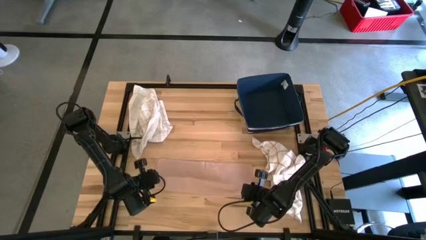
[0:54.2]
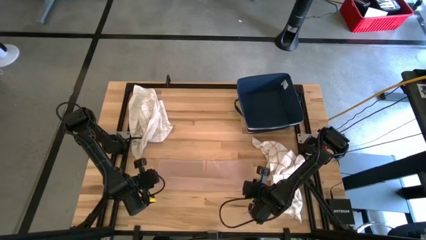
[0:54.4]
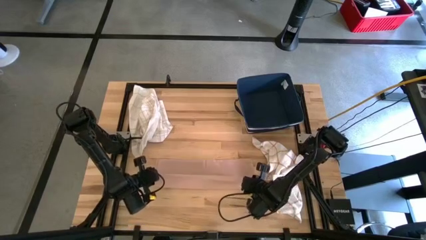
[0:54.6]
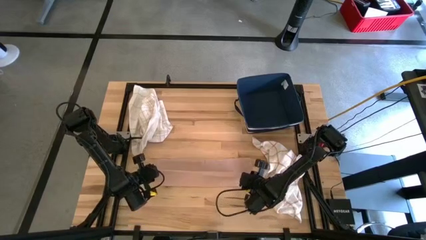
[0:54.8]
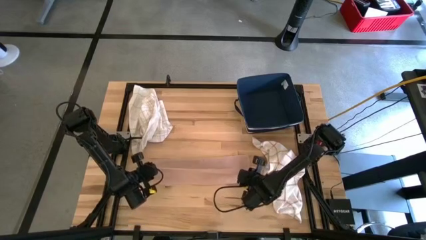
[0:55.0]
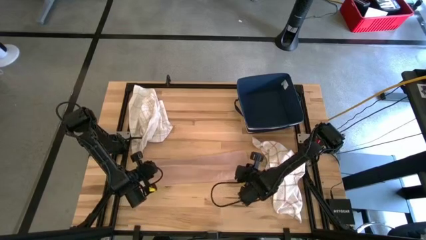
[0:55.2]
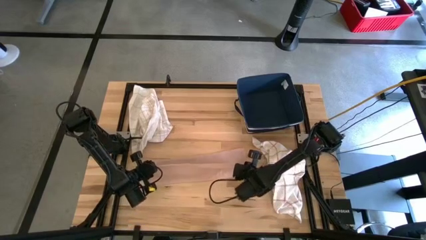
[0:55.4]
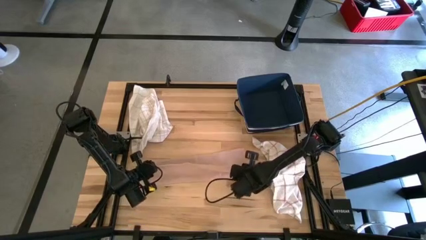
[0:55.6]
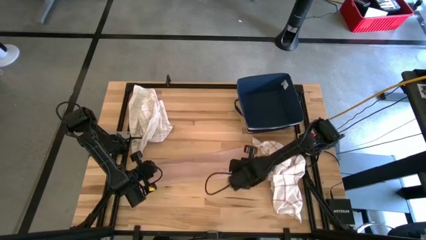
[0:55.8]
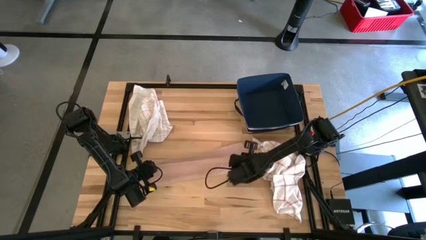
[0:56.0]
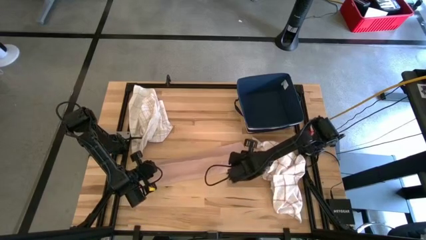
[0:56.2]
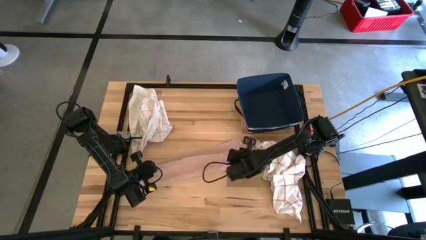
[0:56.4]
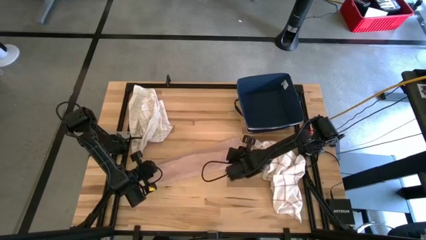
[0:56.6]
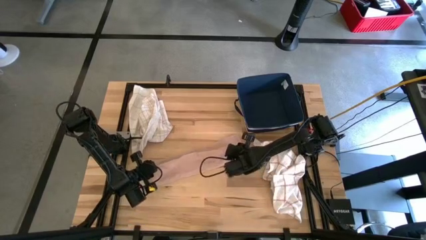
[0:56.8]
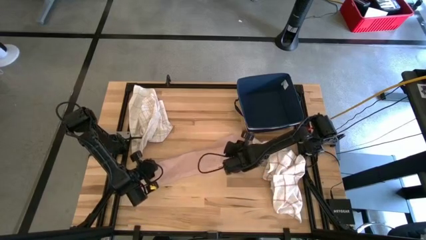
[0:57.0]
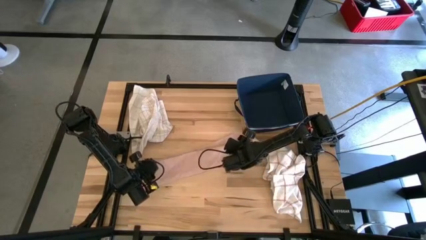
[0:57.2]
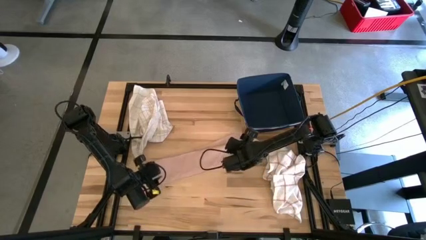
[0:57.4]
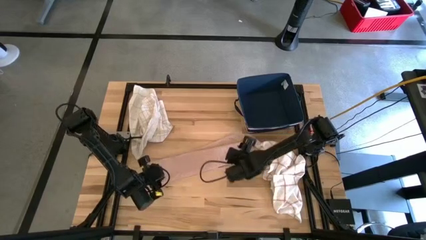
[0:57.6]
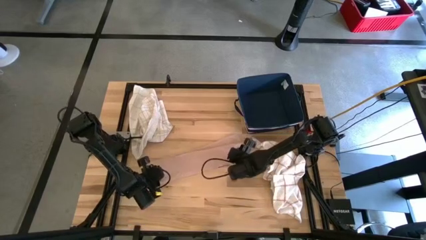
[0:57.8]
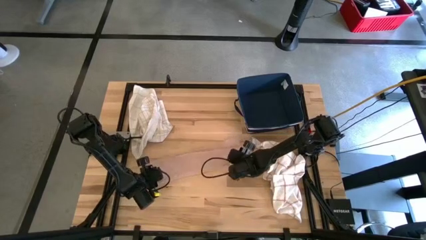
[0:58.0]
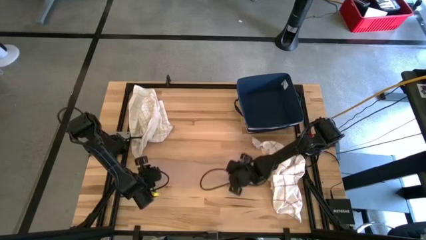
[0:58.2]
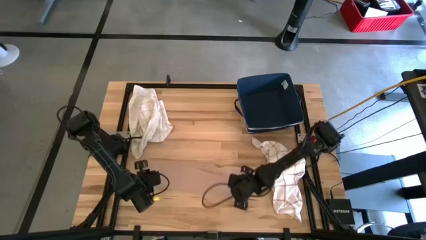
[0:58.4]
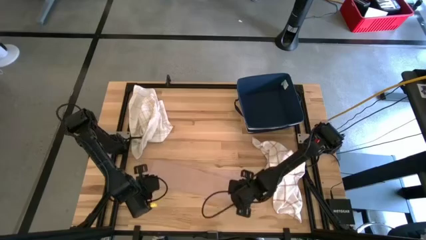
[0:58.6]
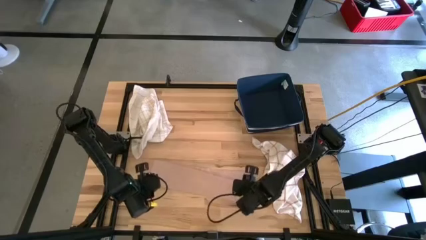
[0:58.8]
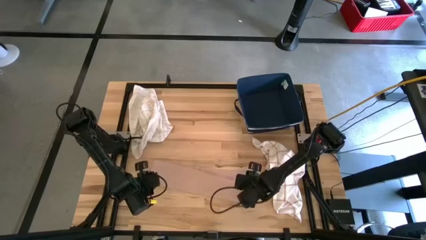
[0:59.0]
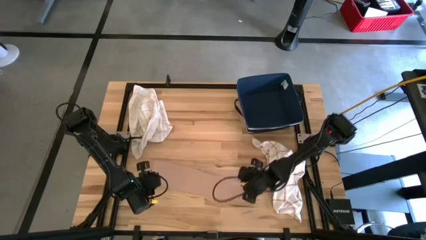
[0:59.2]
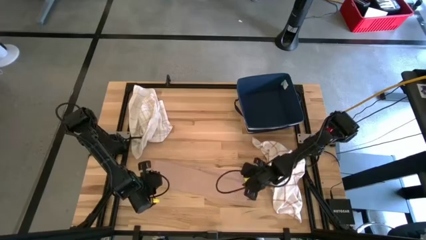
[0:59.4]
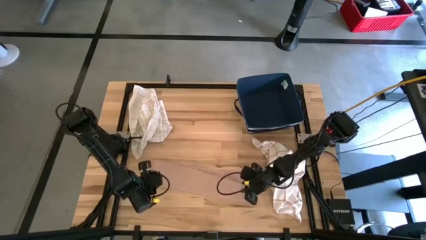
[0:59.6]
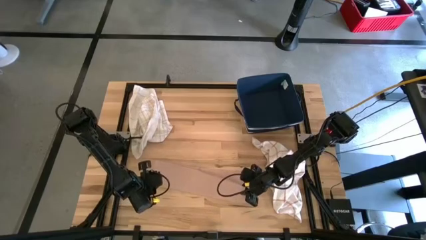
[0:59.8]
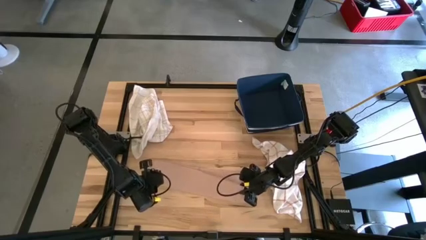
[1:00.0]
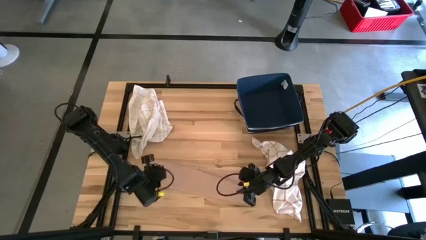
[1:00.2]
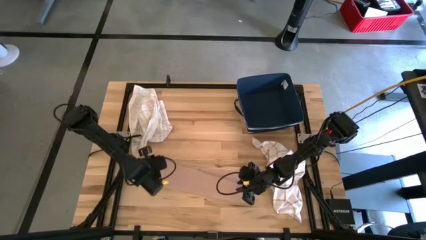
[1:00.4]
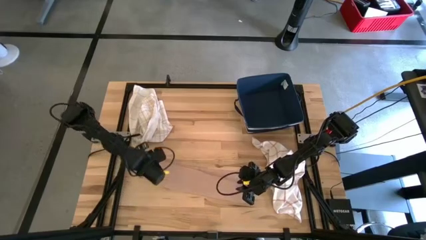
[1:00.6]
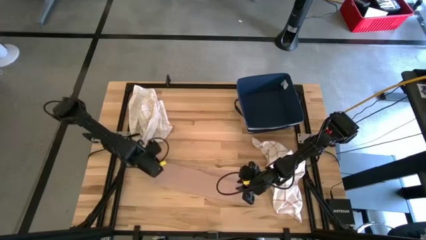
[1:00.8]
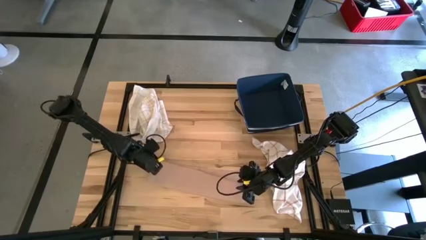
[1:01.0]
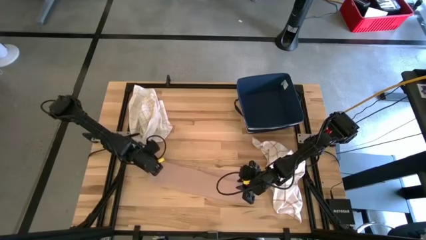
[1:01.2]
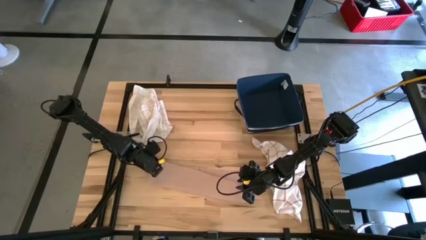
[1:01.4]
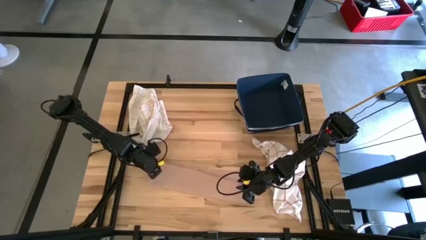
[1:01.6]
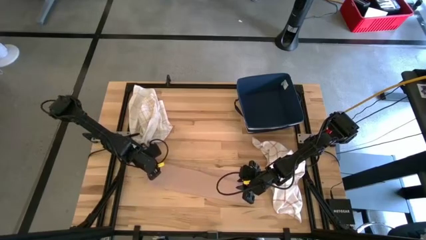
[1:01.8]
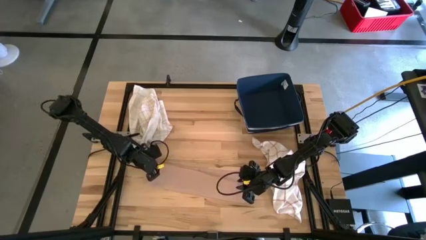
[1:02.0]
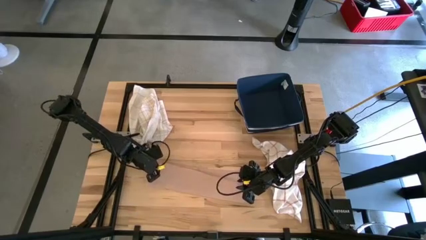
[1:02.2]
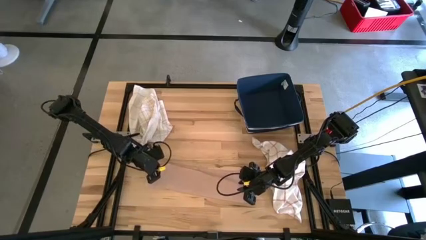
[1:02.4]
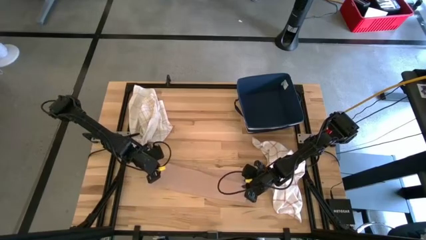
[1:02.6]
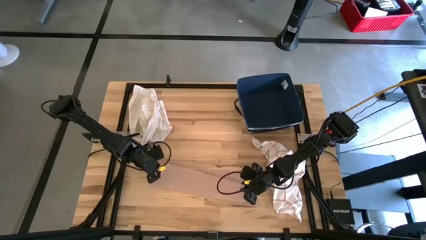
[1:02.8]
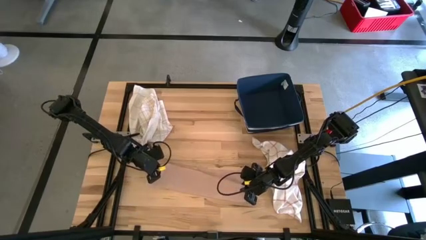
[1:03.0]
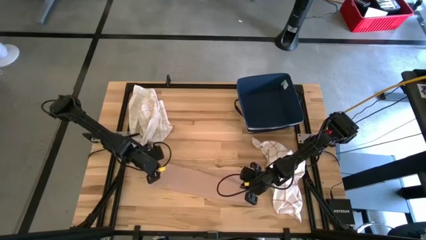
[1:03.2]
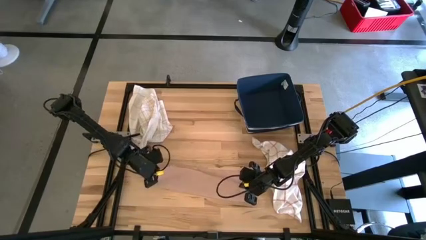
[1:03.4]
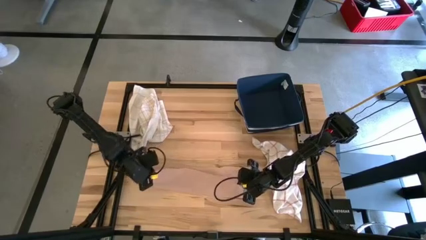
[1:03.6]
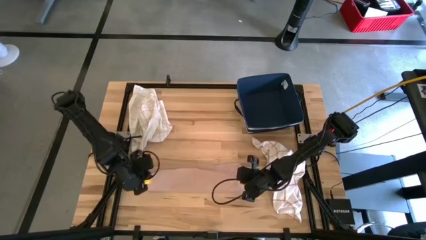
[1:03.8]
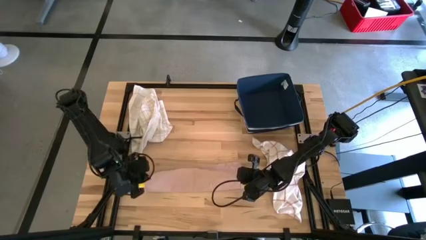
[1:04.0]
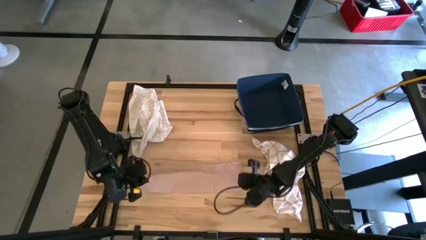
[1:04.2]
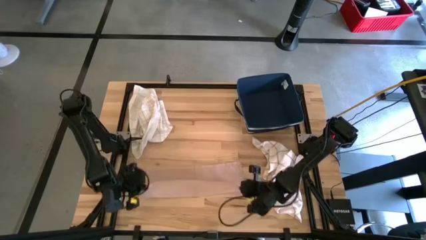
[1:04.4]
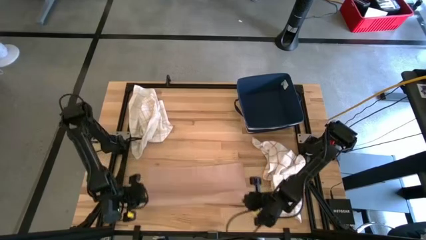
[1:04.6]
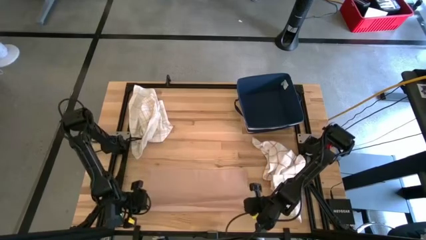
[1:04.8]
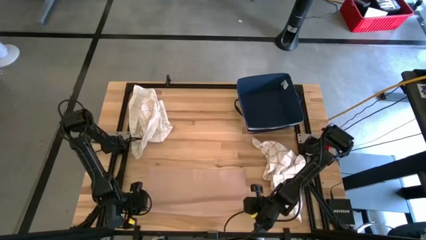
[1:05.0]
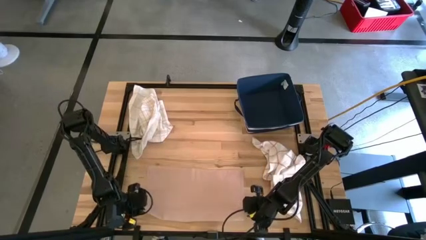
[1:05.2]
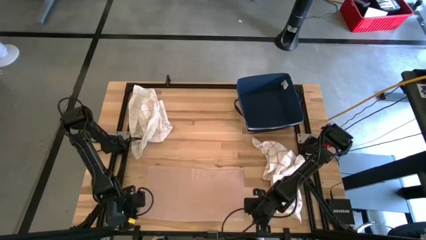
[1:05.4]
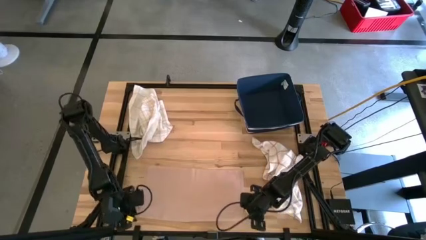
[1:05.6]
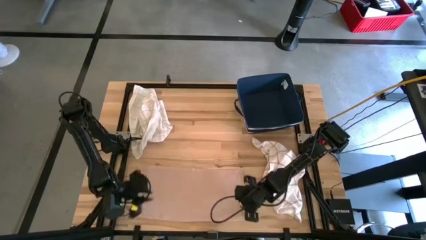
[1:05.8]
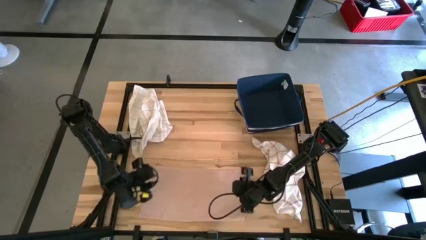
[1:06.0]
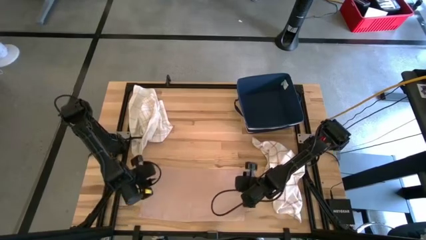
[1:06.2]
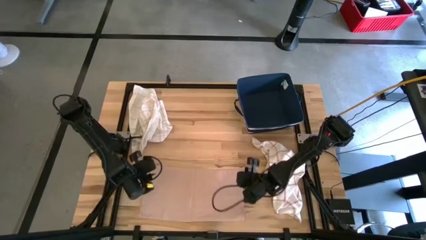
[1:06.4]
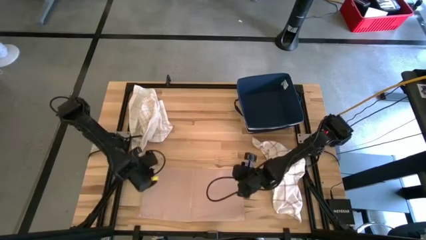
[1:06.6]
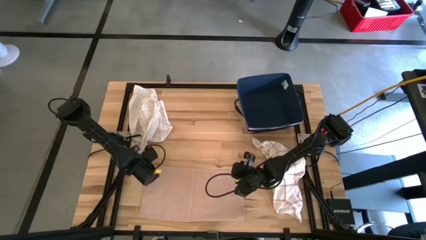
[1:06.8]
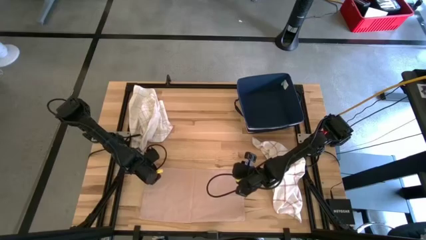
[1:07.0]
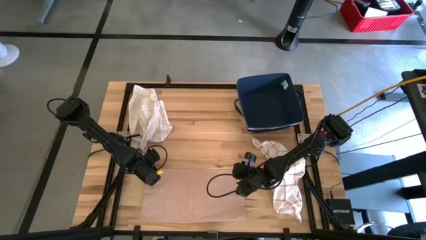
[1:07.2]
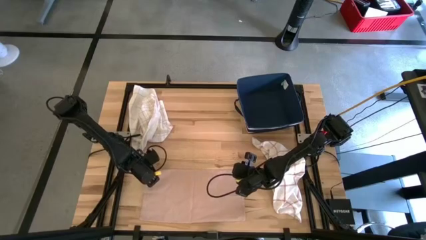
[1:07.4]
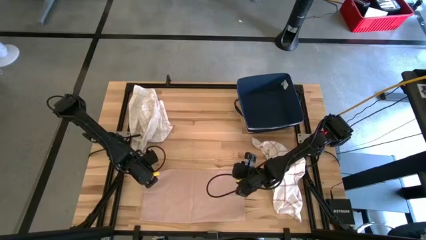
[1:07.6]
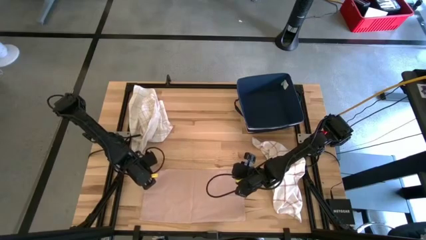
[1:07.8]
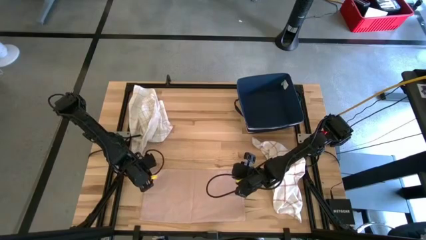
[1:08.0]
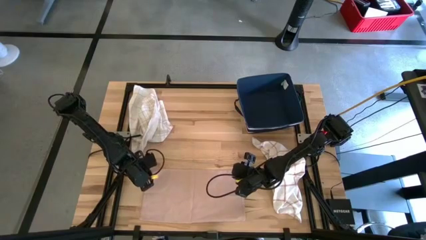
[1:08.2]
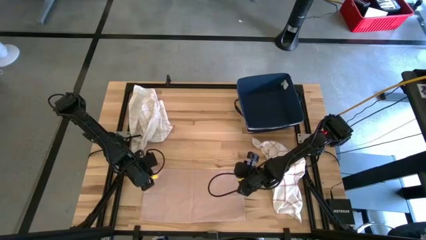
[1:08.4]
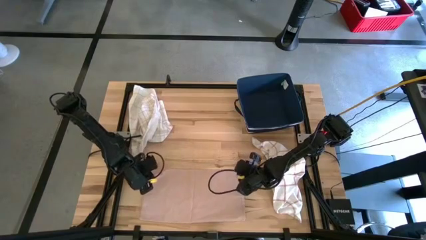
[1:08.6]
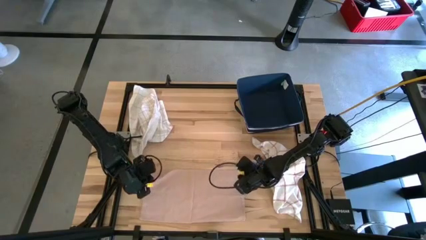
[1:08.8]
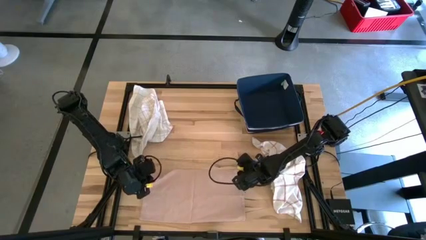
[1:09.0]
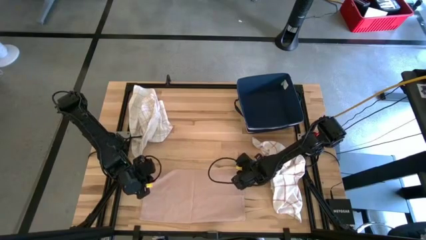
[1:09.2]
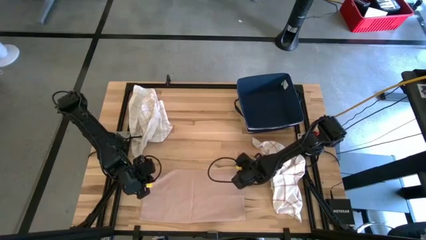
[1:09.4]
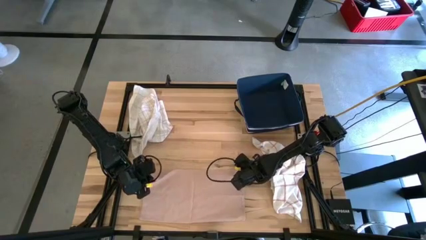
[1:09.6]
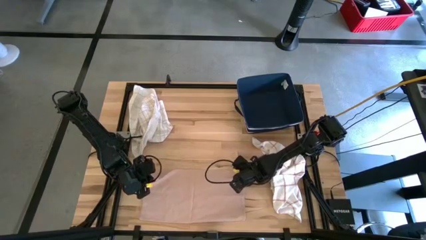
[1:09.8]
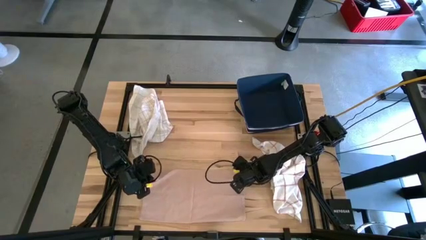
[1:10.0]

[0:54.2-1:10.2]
Task: Fold towel
Fold the pink towel
